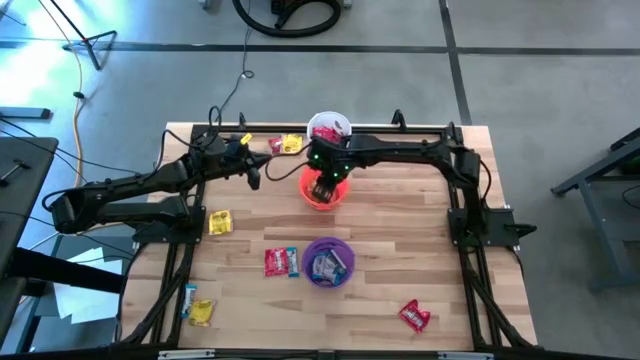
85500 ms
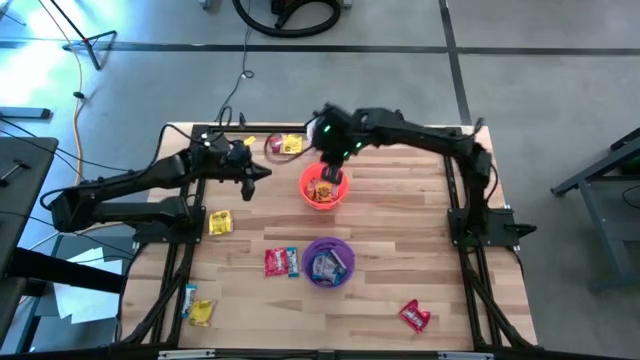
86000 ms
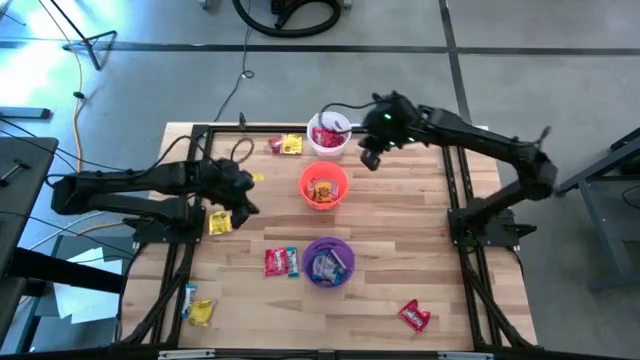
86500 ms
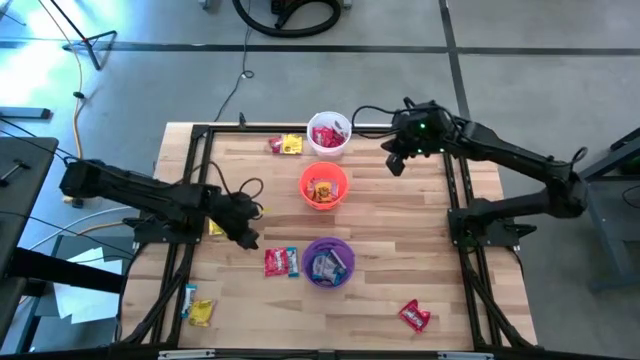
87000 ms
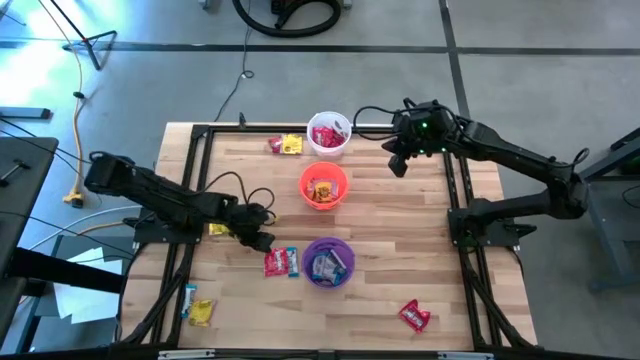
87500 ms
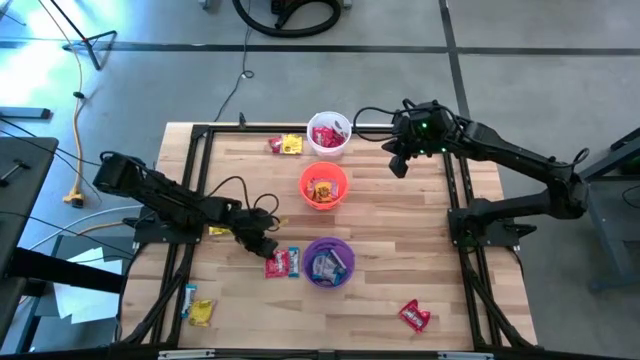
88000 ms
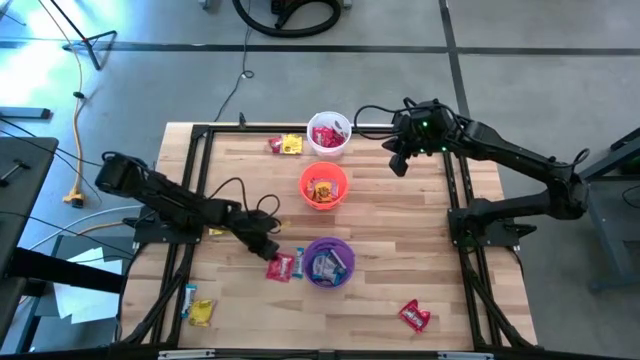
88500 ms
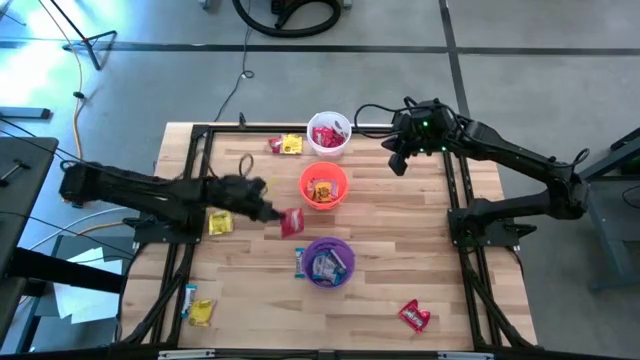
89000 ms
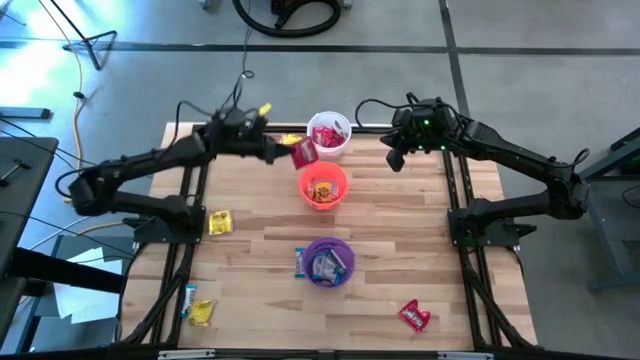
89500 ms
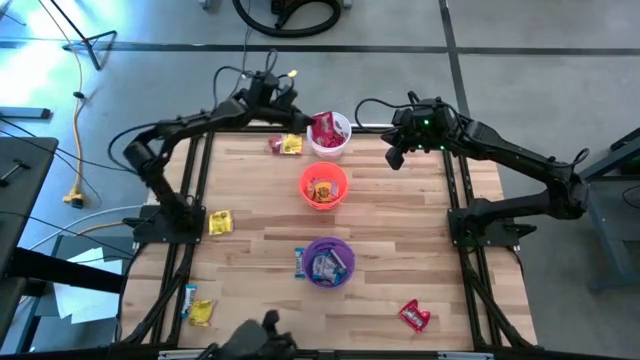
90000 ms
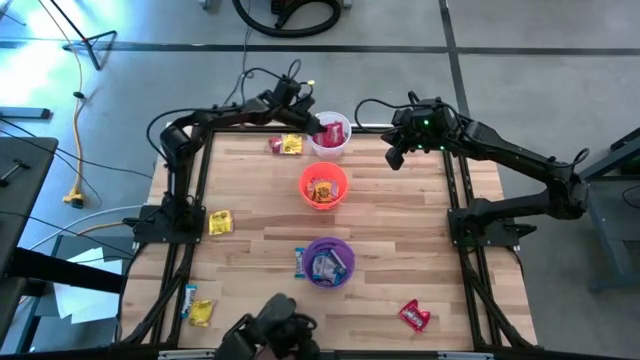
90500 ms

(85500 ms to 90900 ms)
Task: Sort candy
Put the red candy into the white bucket

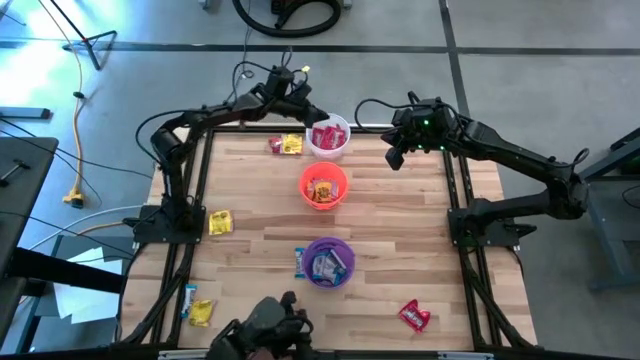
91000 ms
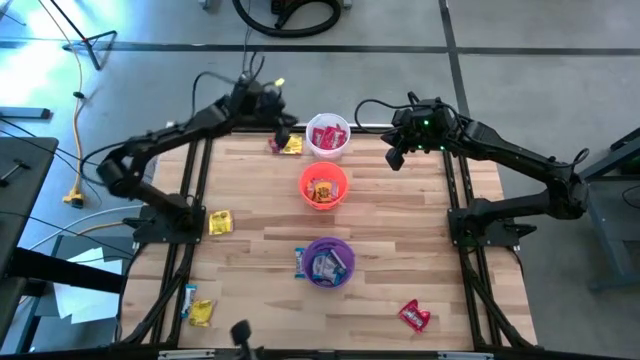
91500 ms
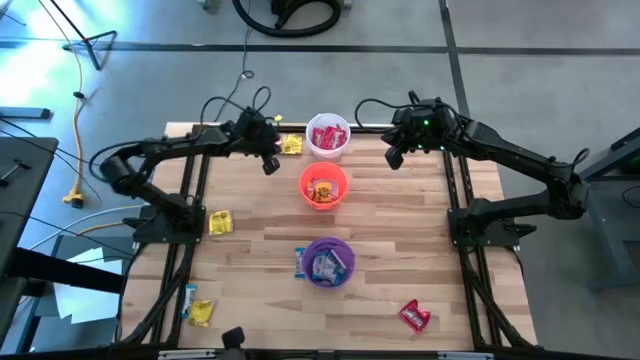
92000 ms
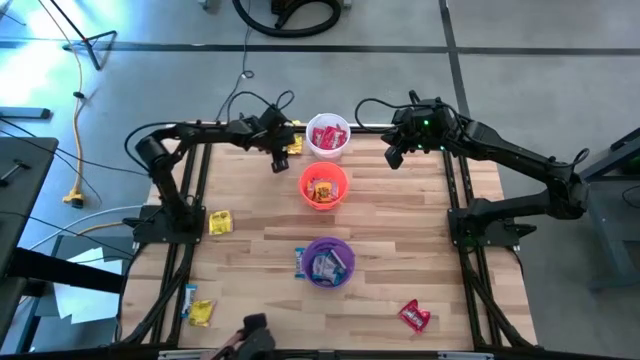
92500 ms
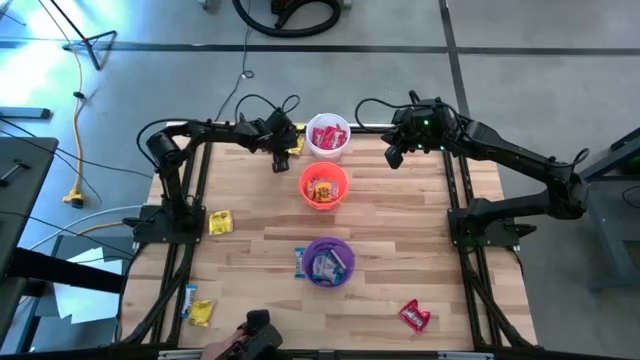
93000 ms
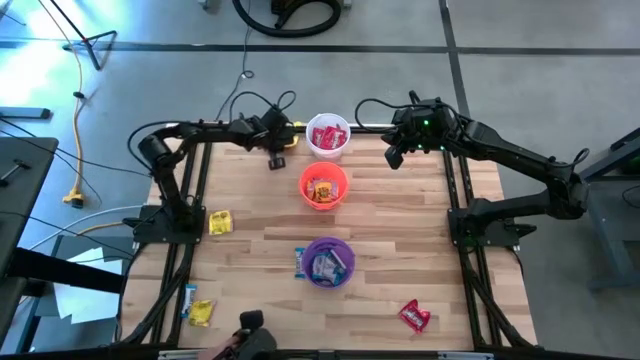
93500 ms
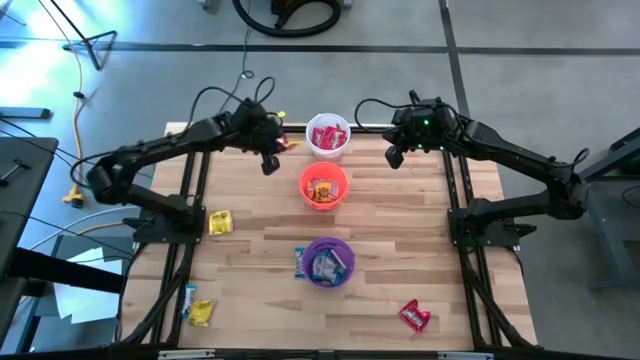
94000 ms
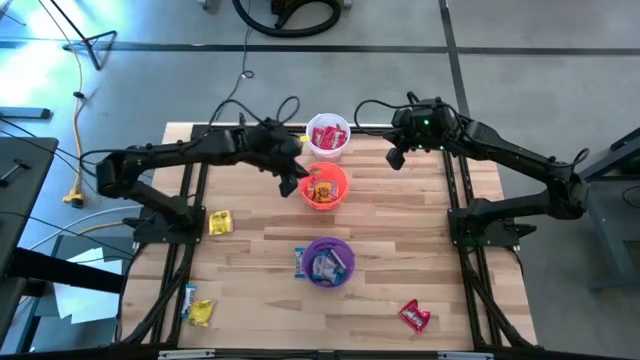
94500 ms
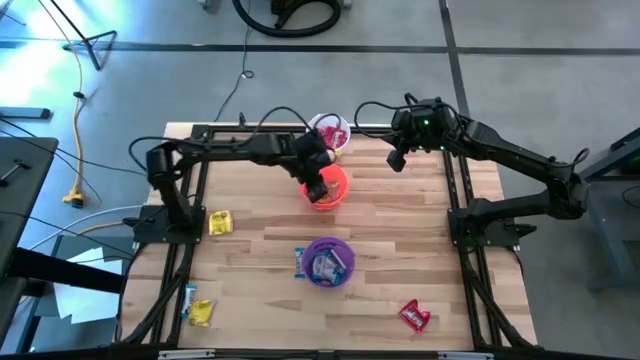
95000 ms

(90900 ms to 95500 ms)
Put the yellow candy into the orange bucket

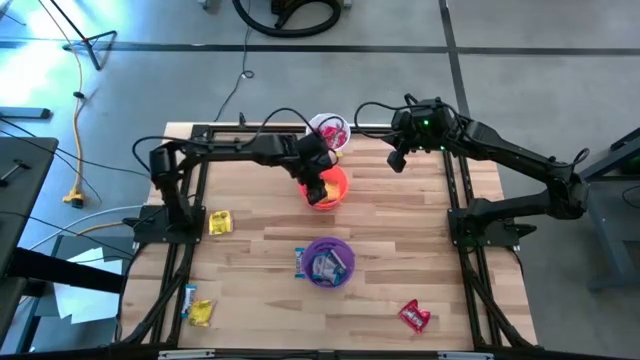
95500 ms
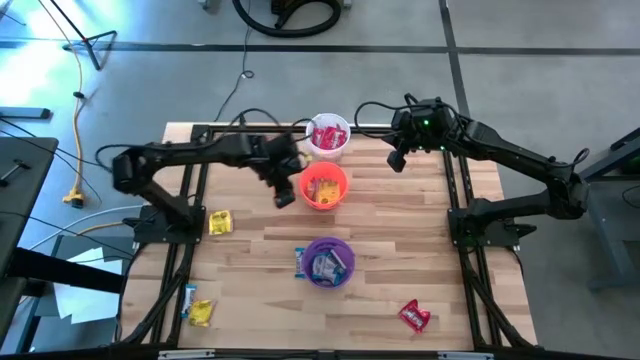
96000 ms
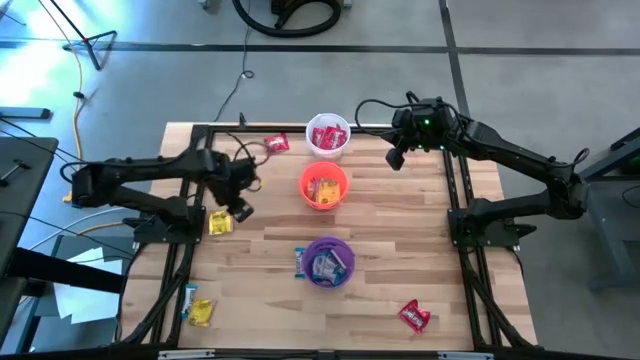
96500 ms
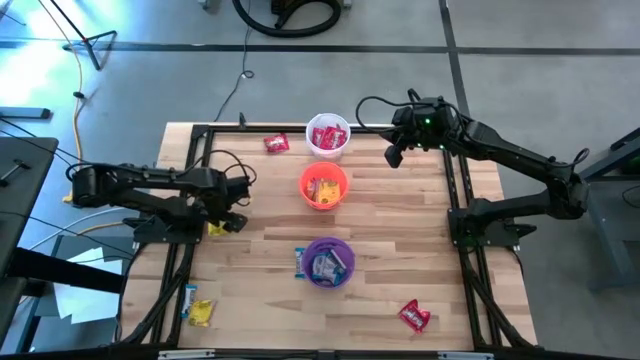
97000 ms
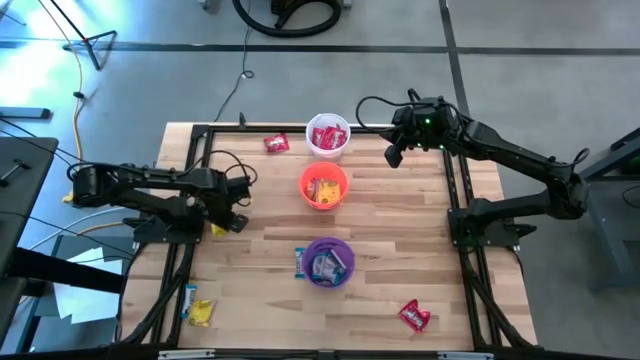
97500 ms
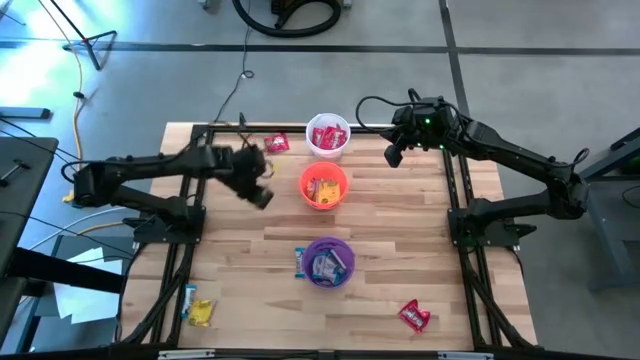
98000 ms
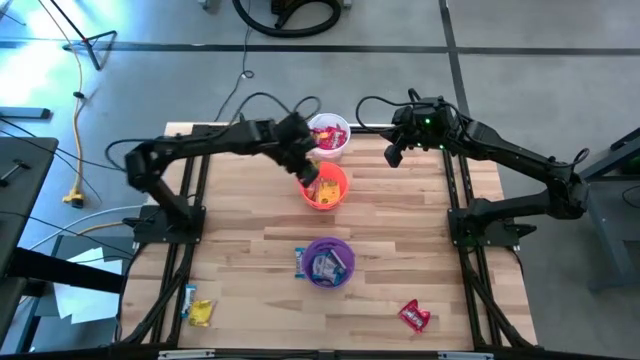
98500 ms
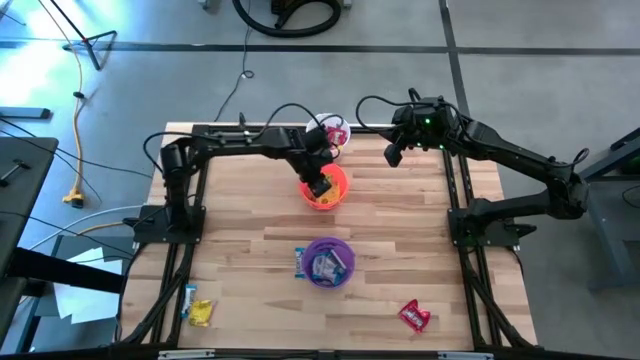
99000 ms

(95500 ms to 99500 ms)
Put the yellow candy into the orange bucket

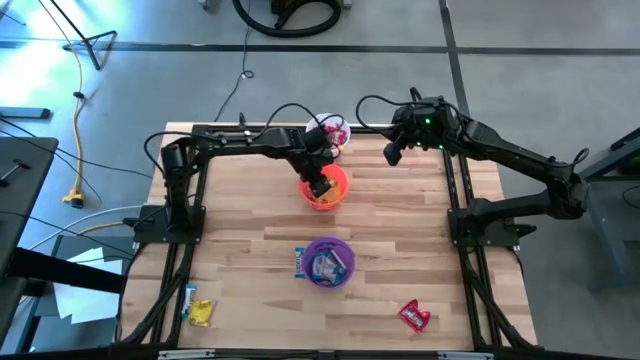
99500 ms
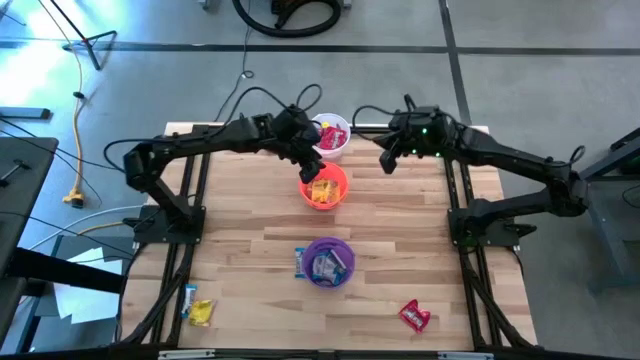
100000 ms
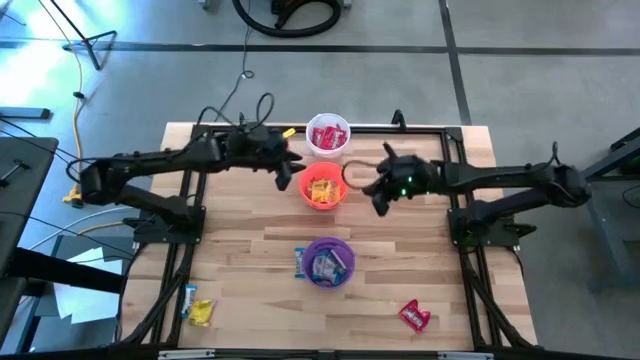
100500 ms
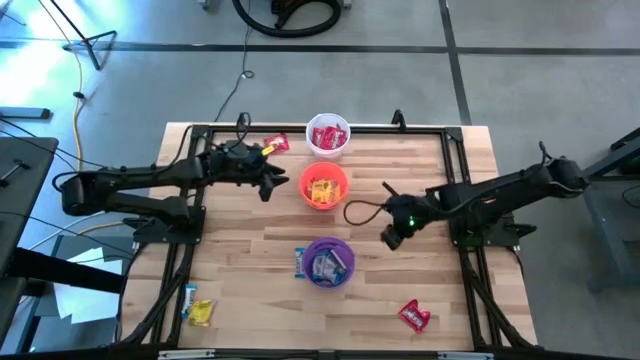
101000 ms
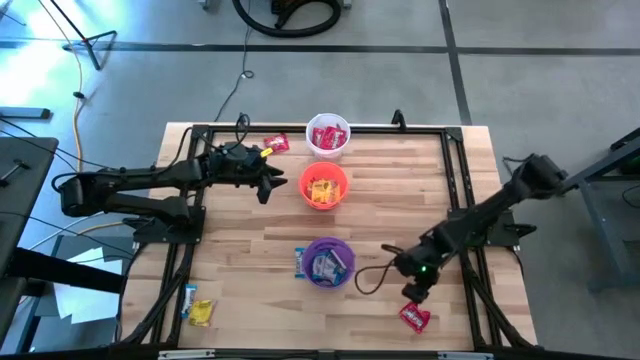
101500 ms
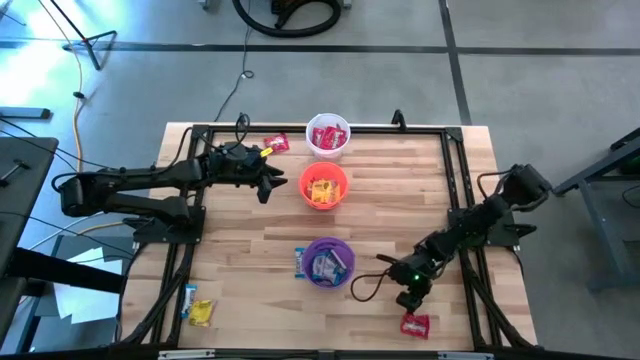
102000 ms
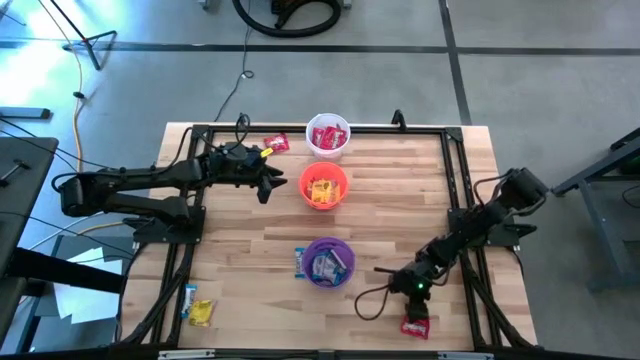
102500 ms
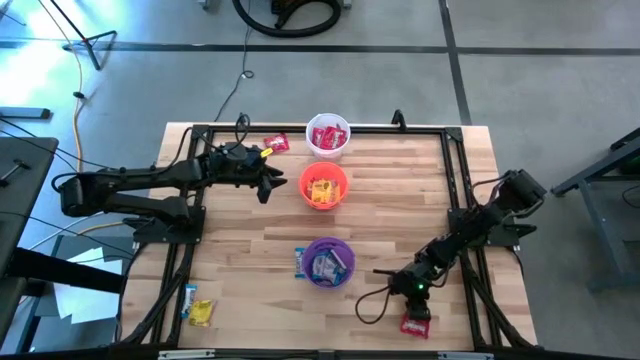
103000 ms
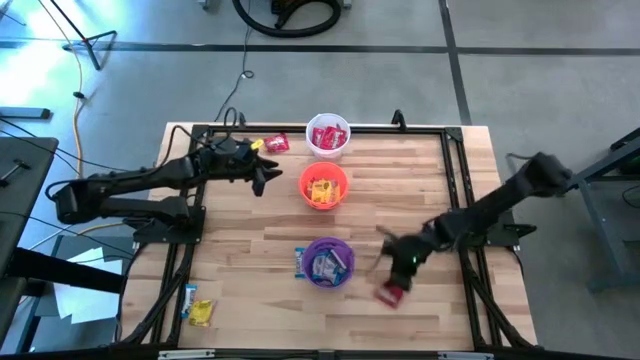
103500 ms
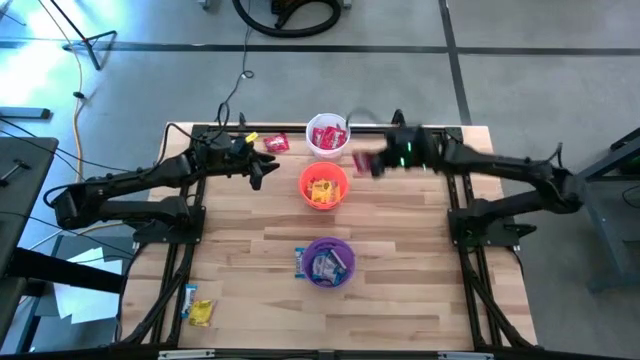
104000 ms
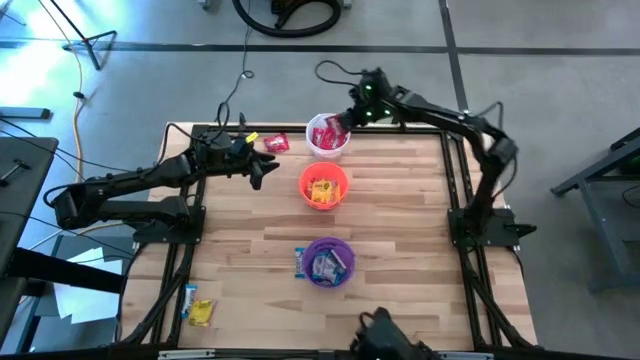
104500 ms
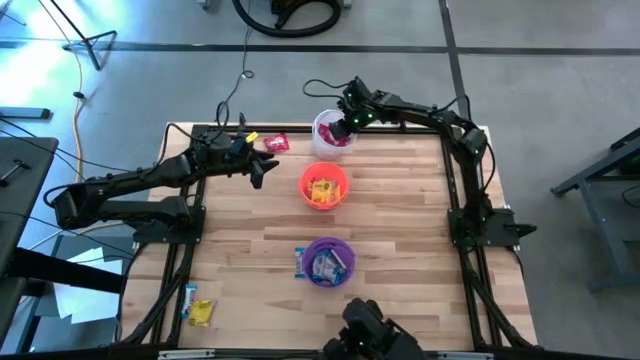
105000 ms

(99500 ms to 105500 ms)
Put the red candy into the white bucket

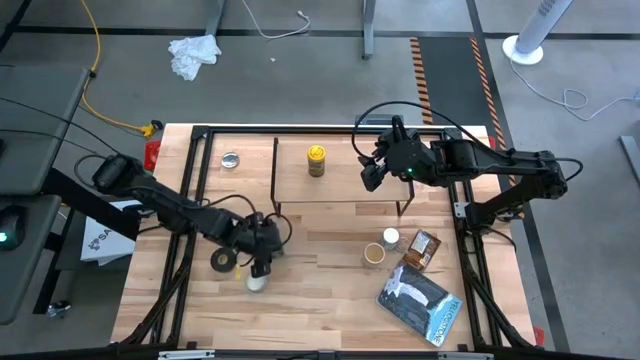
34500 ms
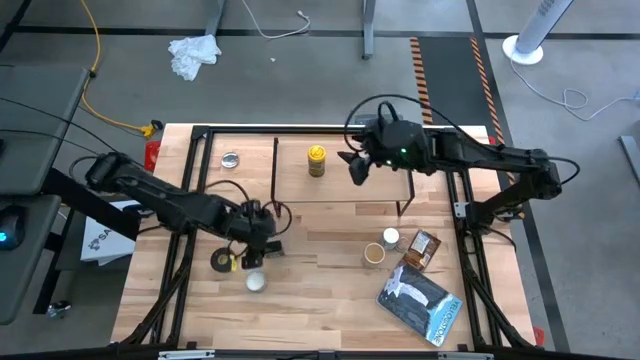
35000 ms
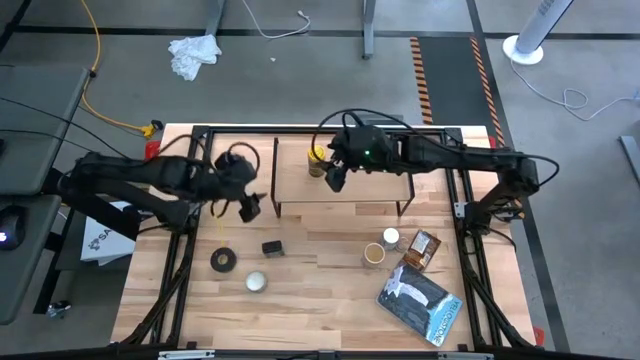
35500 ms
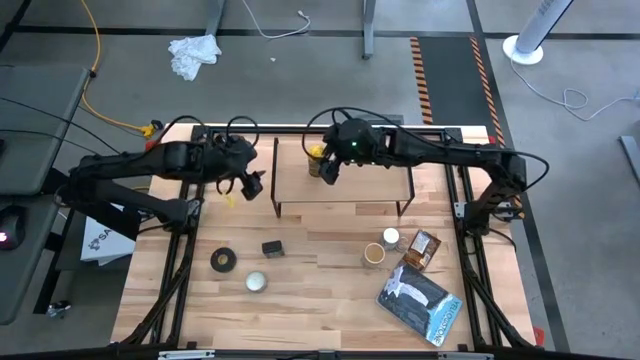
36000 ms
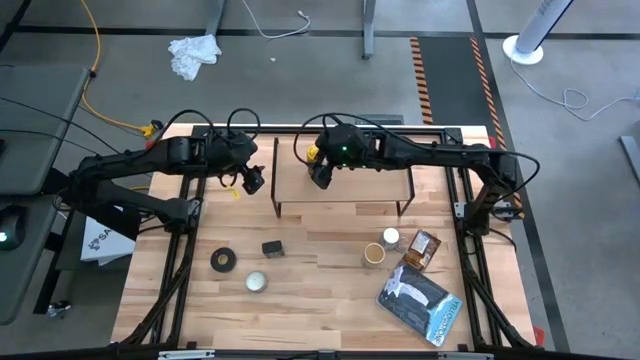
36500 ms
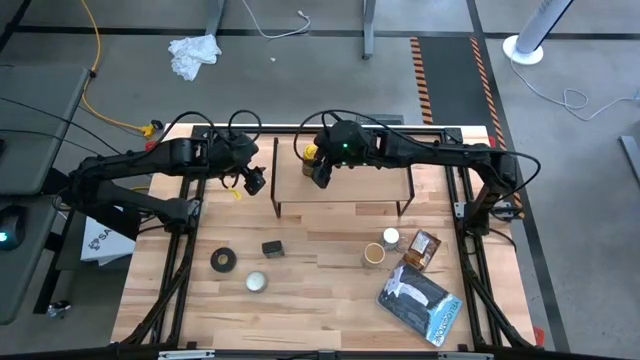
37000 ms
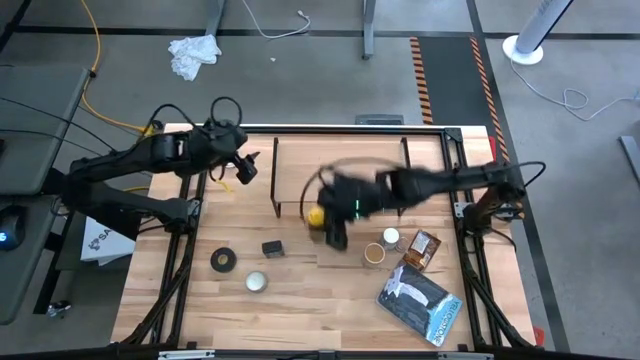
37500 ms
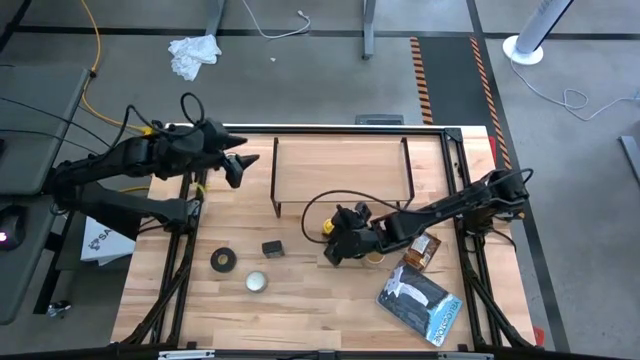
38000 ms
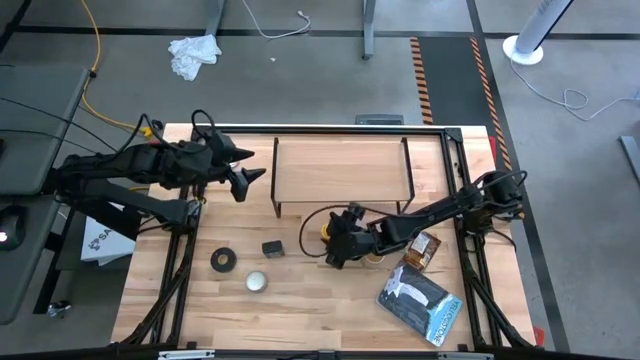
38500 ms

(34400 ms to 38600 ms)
Task: Shelf spices
Remove the yellow seasoning bottle from the shelf
